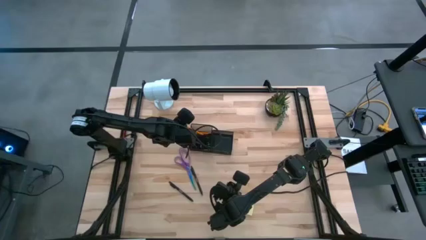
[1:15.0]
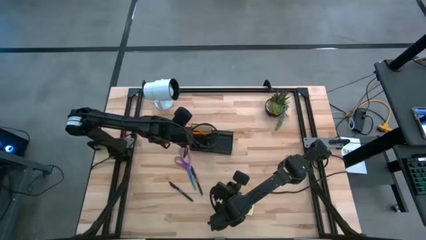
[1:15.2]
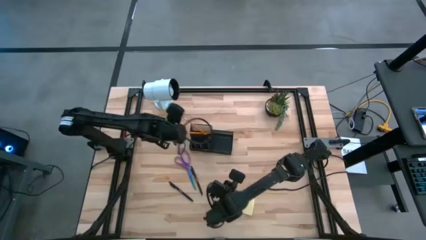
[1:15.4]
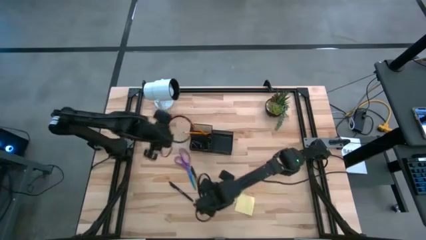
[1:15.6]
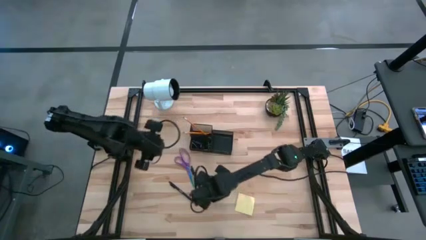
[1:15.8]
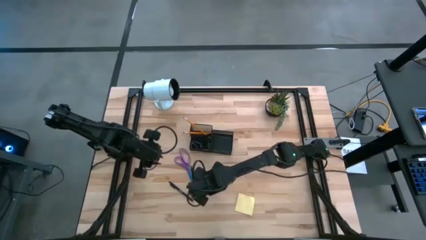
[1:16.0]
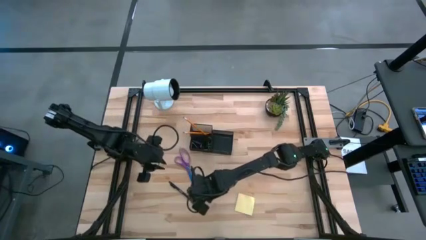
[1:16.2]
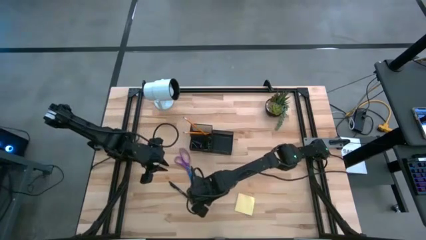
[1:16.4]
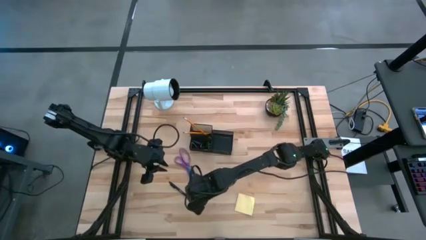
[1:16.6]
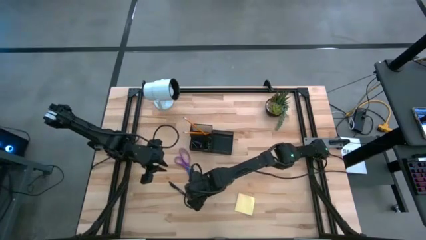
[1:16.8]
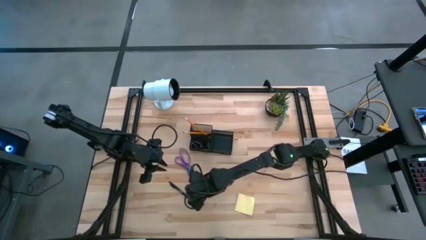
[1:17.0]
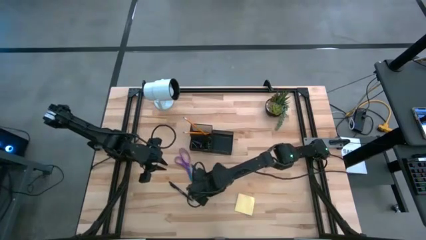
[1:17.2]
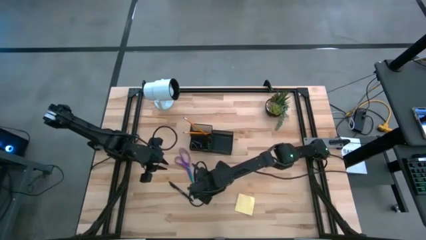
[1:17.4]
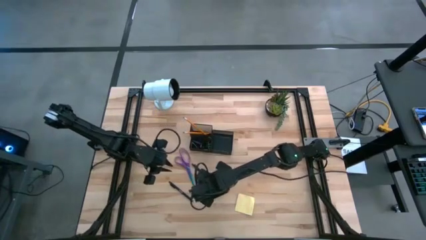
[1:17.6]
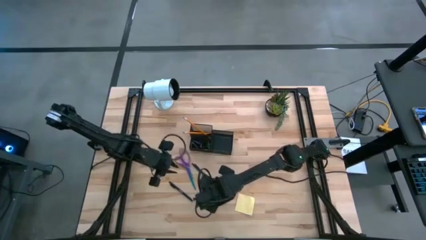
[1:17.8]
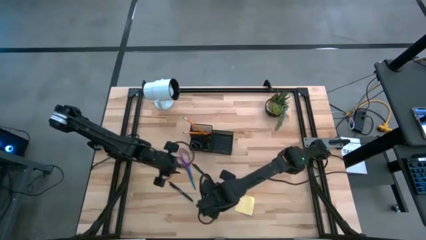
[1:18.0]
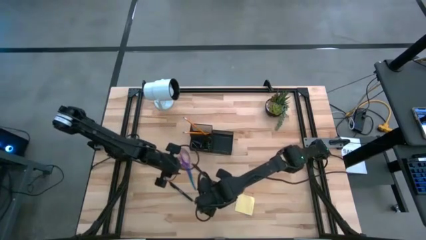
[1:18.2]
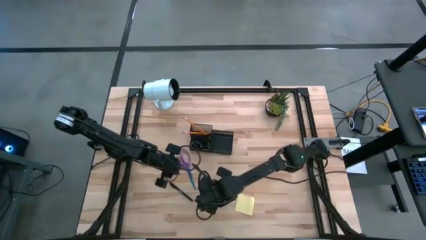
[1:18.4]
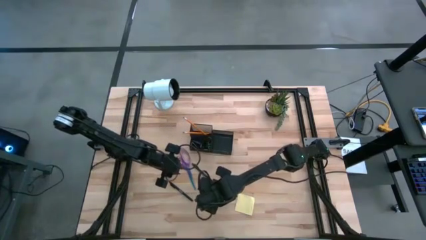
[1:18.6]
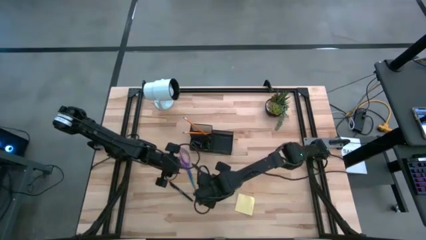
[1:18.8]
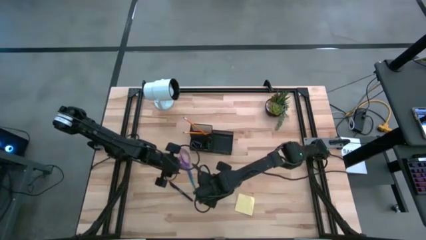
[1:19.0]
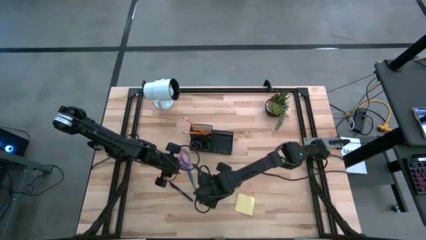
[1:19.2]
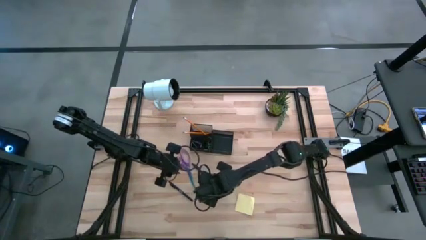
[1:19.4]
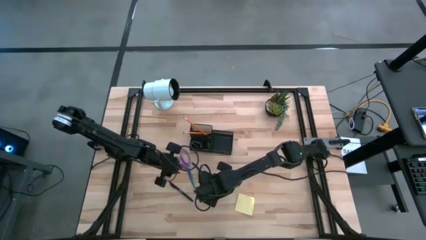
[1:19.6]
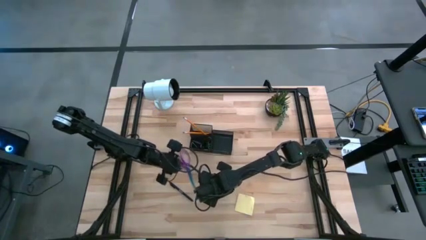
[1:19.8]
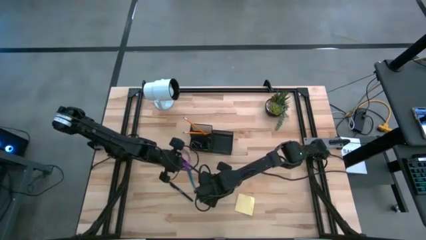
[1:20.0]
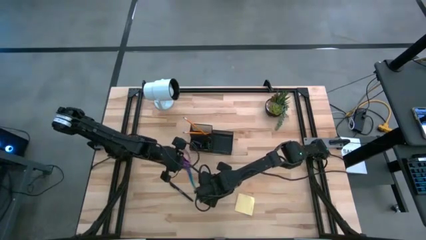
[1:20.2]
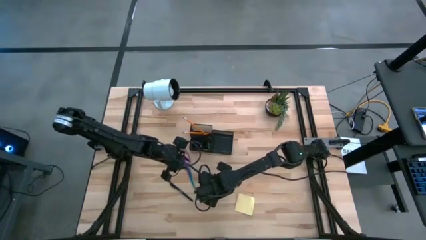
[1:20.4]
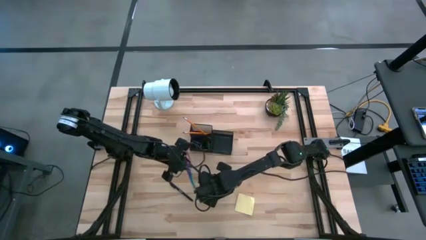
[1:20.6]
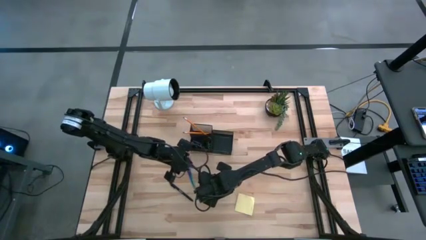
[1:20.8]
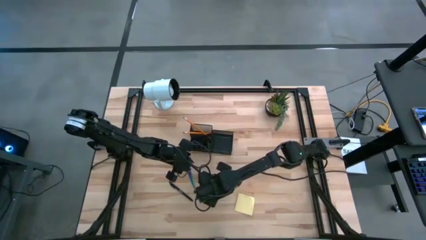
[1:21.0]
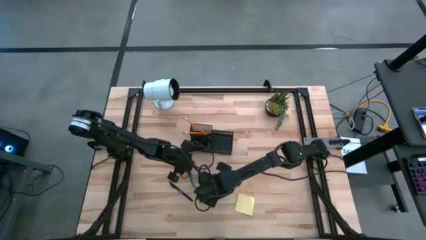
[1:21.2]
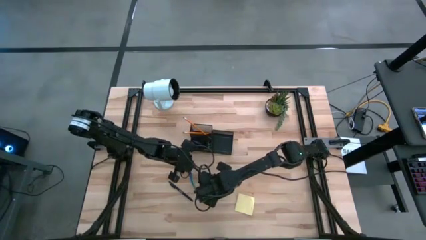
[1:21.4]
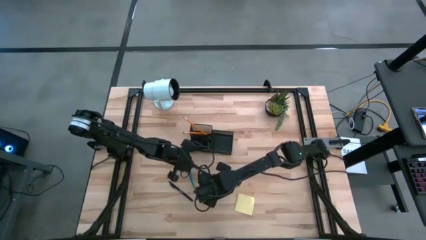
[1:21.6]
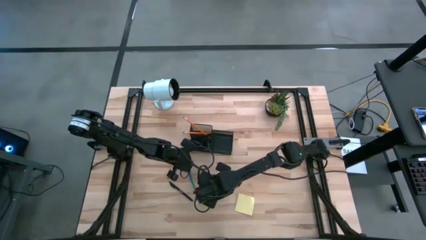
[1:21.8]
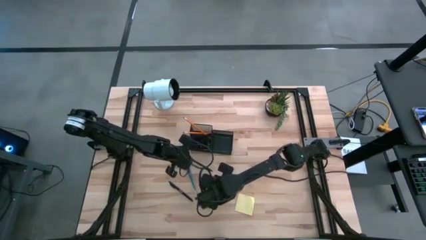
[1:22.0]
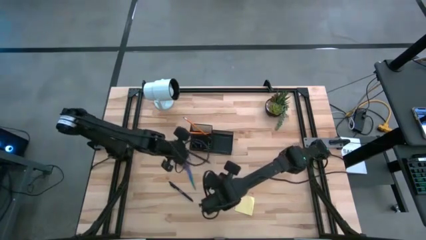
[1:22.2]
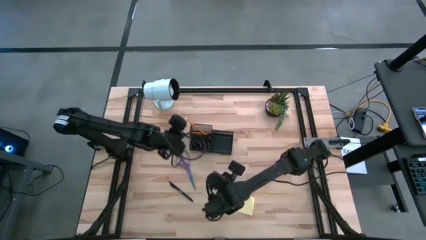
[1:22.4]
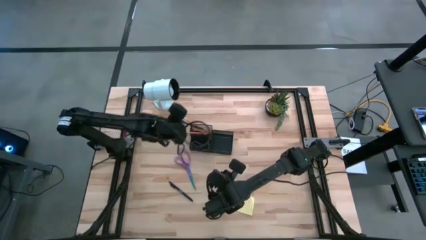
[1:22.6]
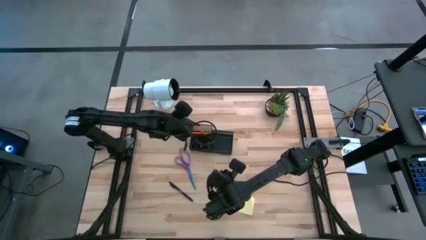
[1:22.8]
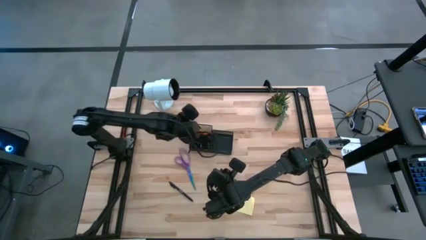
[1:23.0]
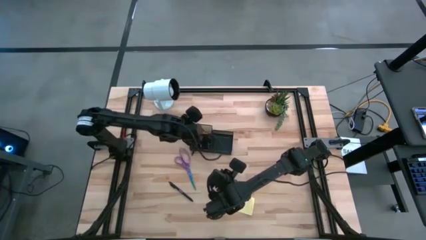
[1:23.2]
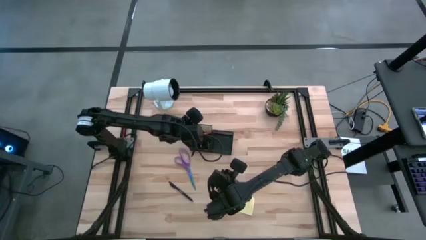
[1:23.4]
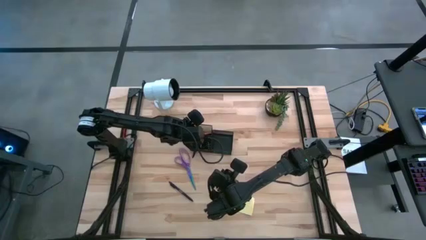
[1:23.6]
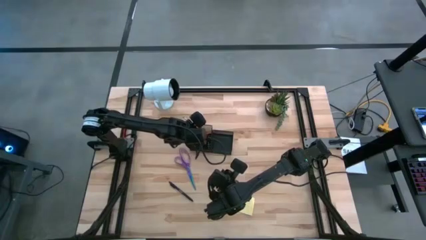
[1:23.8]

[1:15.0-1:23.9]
Task: Pick and place office supplies into organizer
Put the right black pen into the black desk organizer

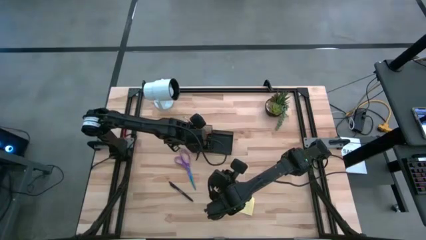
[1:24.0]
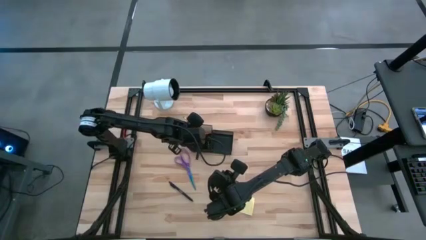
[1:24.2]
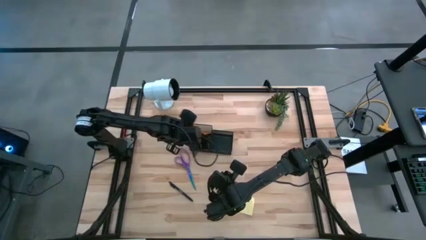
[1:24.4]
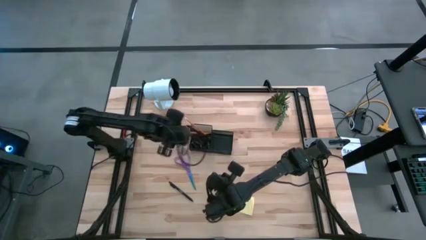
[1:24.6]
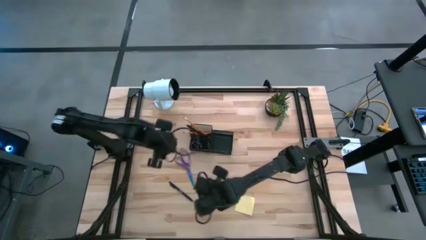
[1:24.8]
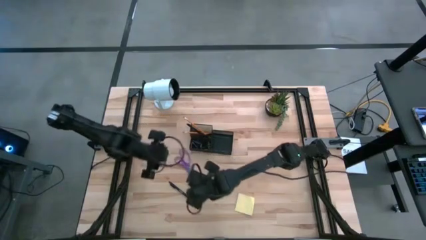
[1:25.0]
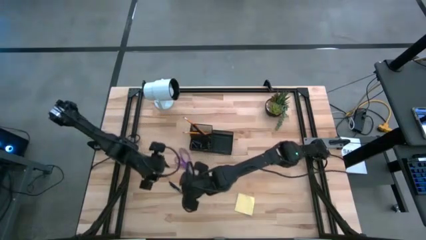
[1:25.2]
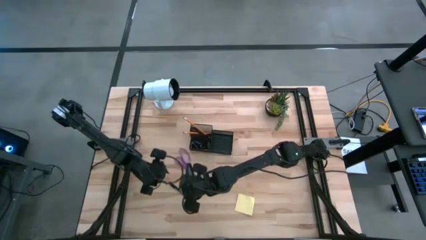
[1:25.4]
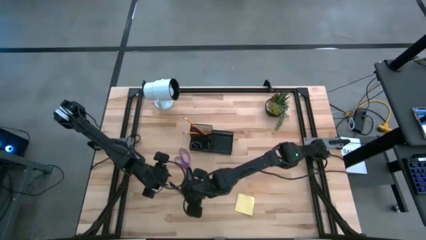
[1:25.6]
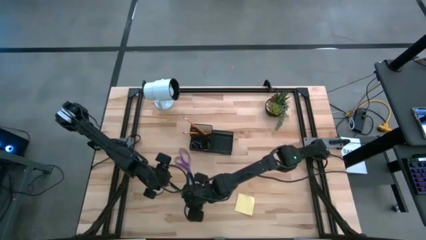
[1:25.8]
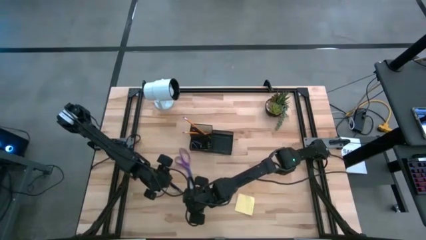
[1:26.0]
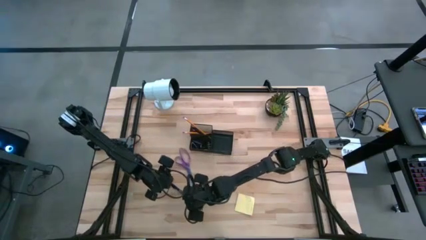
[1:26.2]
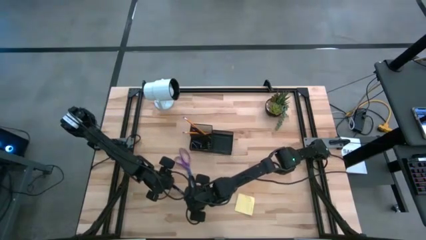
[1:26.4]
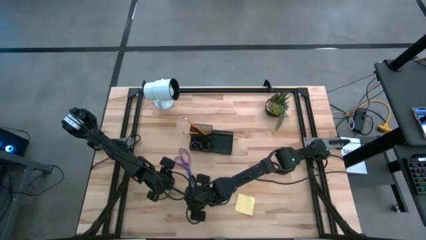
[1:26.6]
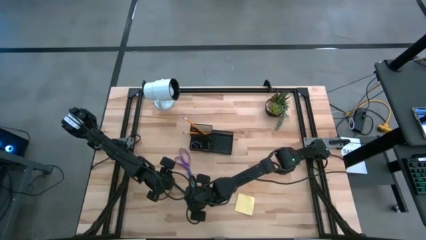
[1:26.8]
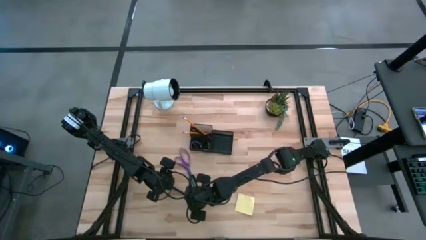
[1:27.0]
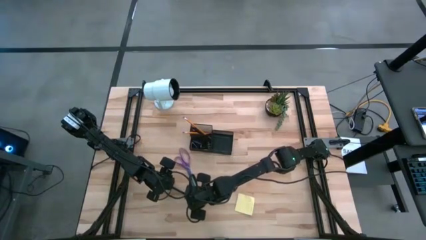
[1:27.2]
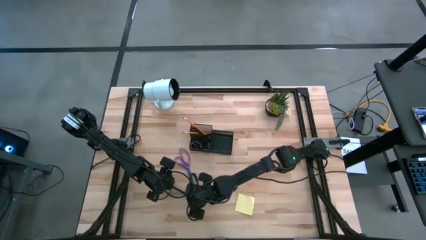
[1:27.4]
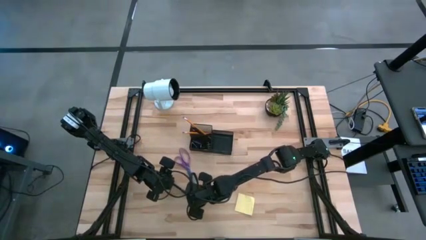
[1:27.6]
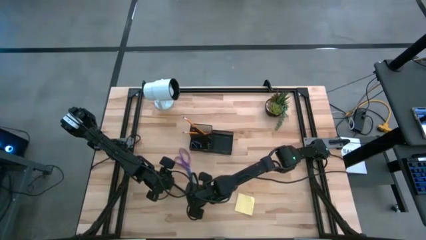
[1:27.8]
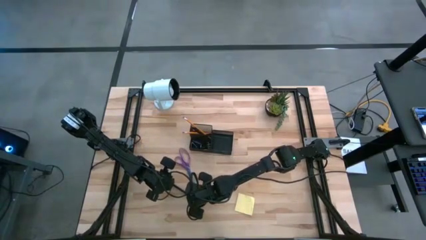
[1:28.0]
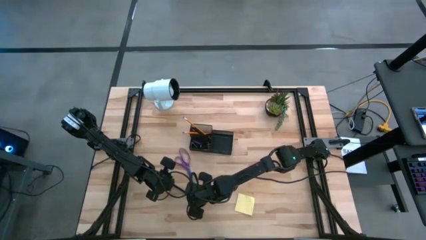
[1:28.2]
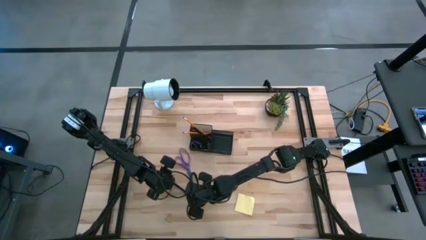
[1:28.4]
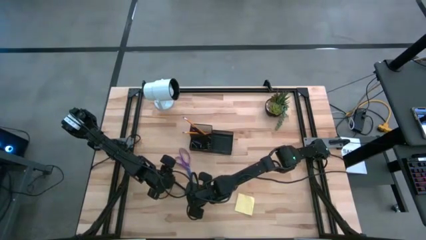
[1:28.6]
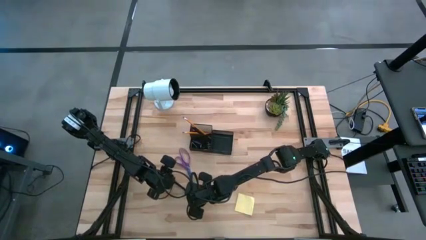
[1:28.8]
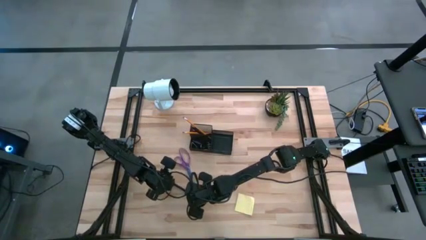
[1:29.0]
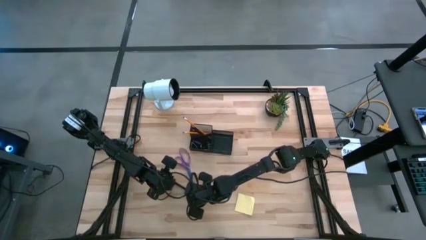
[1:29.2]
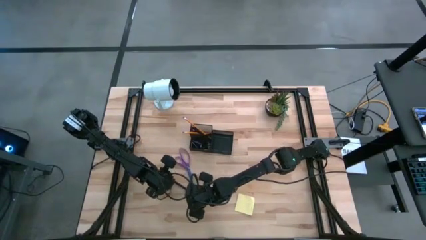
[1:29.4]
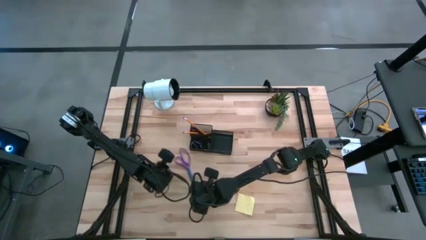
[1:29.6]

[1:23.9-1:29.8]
Put the black pen into the black desk organizer

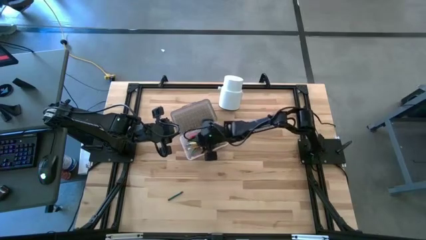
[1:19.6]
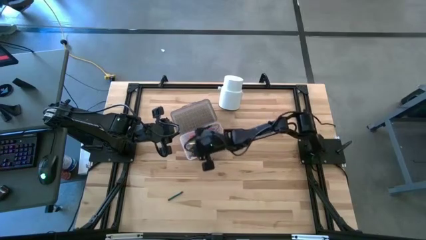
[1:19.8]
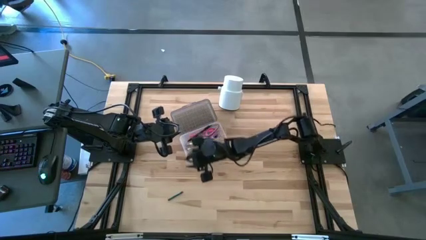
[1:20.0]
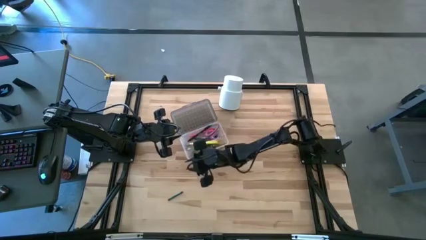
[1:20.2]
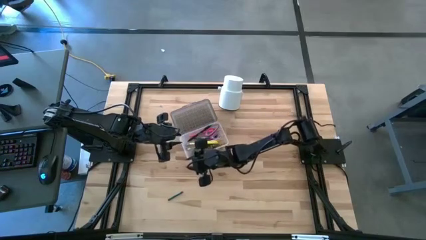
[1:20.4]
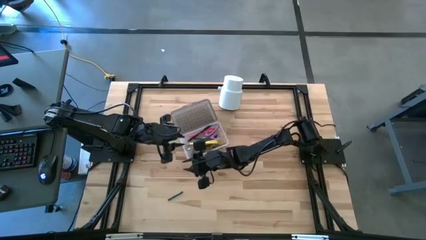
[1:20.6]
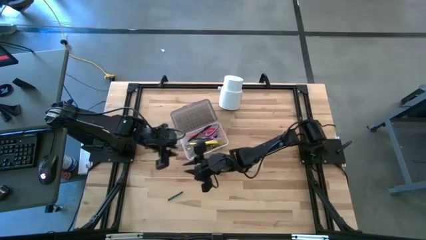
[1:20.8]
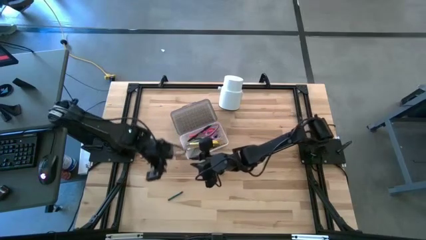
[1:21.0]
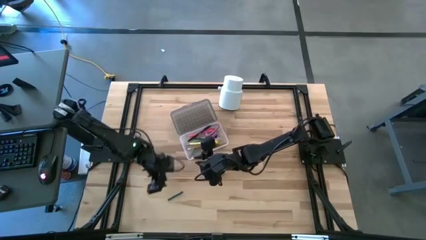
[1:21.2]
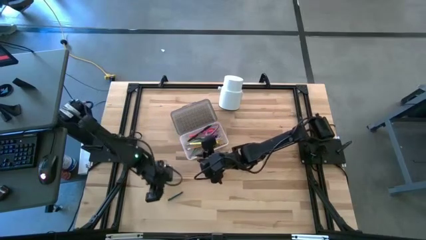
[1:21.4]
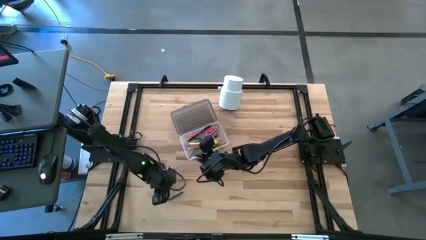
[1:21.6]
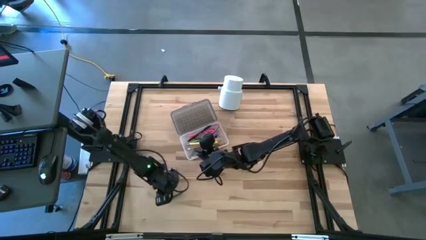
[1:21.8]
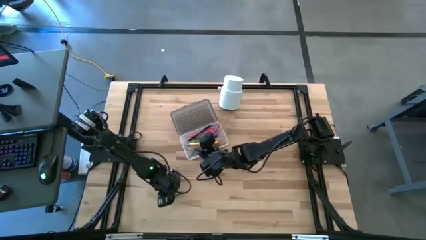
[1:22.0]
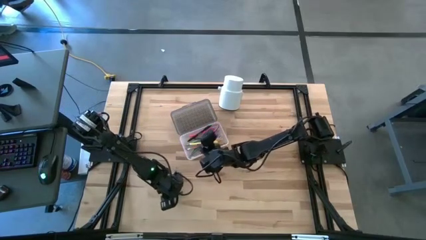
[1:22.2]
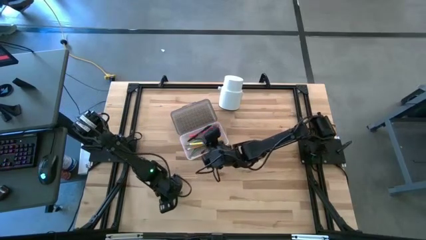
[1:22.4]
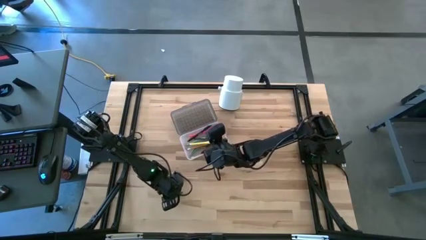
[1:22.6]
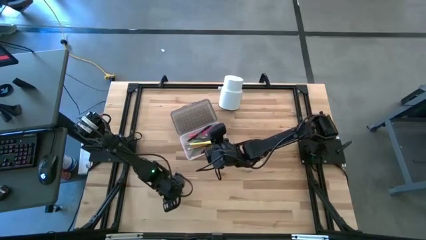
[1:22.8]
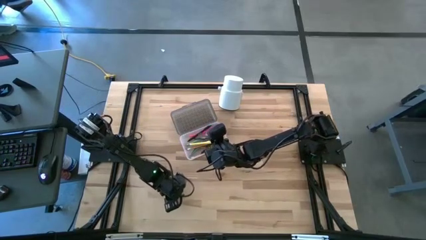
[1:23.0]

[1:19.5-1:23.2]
Task: Pick & place school supplies into a supply box
Put the green crayon into the black supply box
